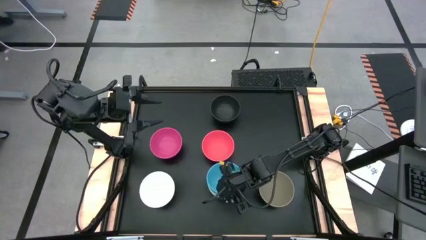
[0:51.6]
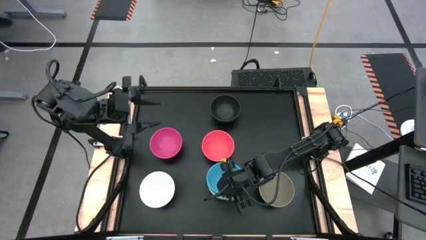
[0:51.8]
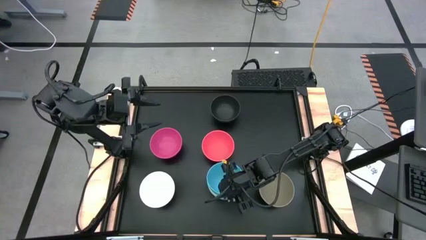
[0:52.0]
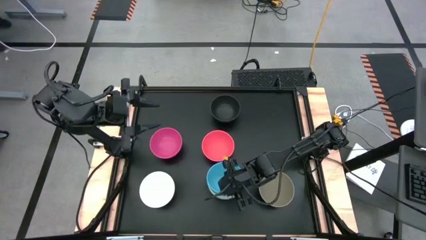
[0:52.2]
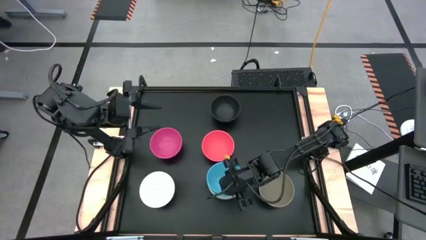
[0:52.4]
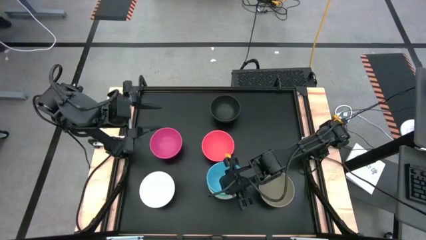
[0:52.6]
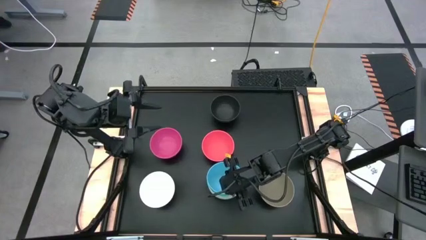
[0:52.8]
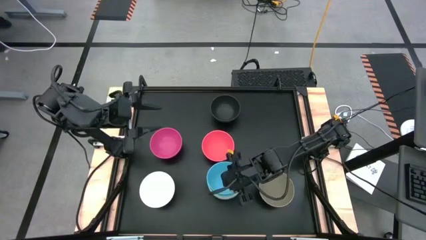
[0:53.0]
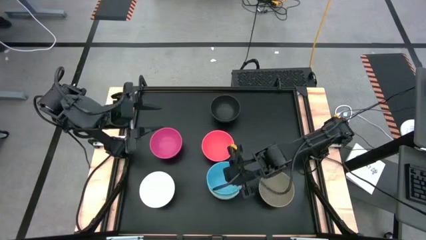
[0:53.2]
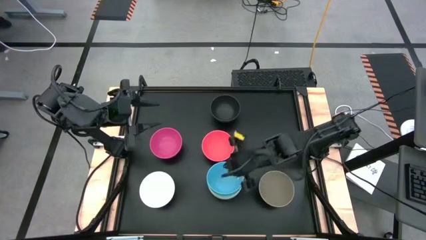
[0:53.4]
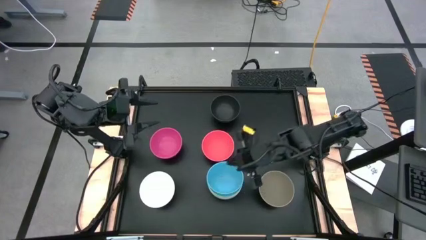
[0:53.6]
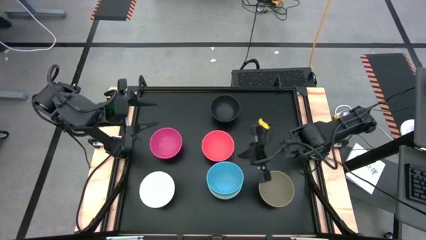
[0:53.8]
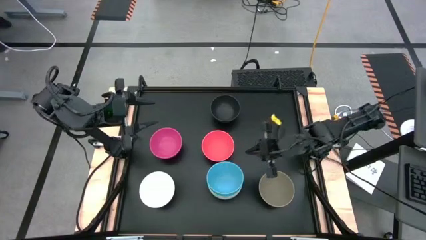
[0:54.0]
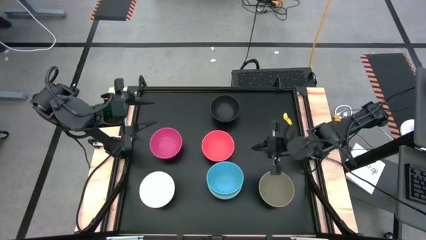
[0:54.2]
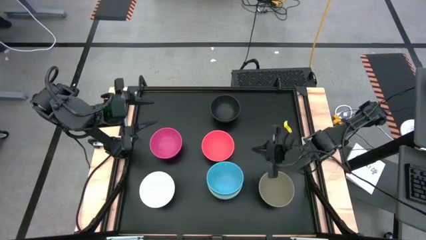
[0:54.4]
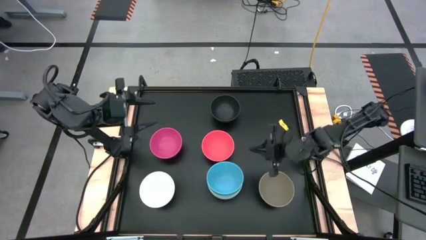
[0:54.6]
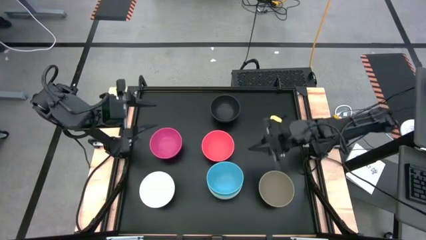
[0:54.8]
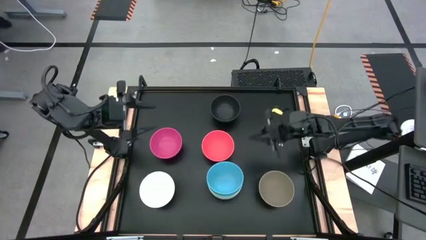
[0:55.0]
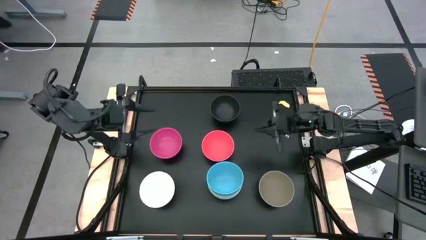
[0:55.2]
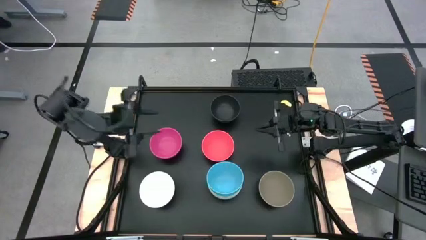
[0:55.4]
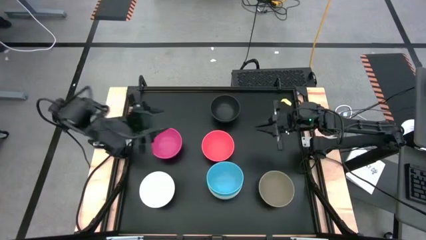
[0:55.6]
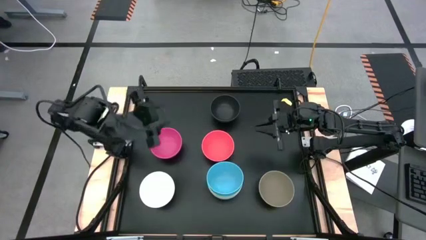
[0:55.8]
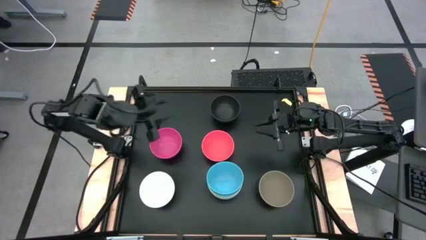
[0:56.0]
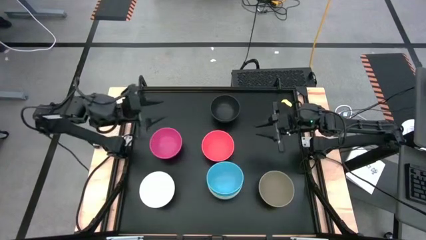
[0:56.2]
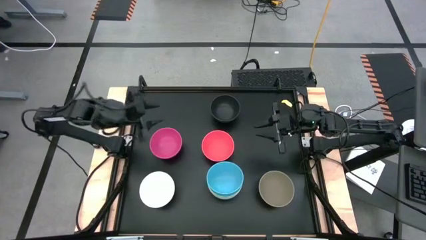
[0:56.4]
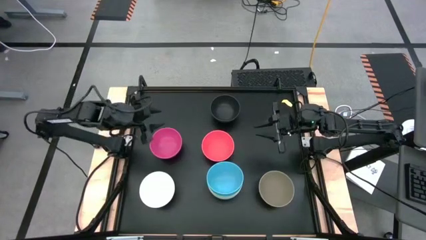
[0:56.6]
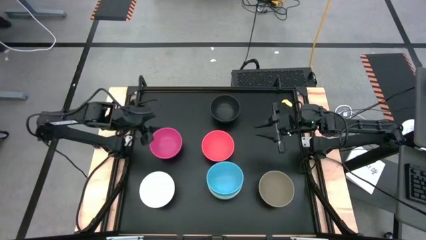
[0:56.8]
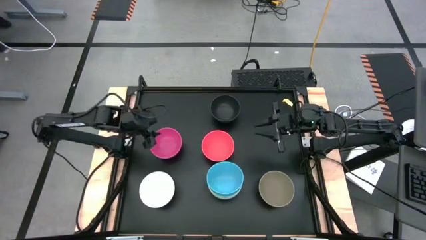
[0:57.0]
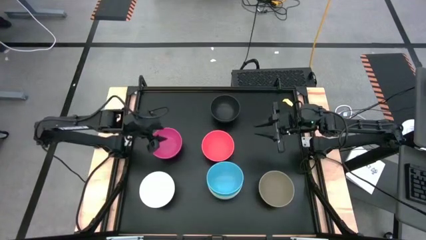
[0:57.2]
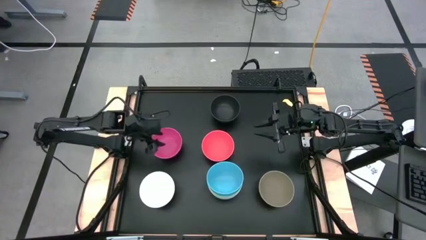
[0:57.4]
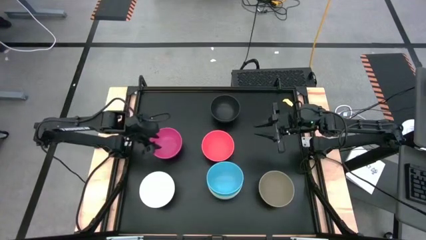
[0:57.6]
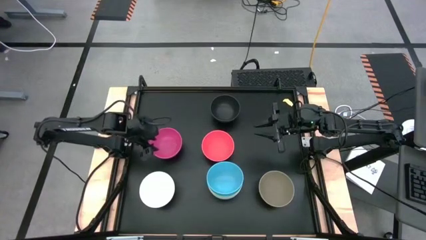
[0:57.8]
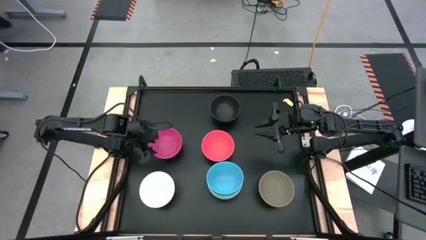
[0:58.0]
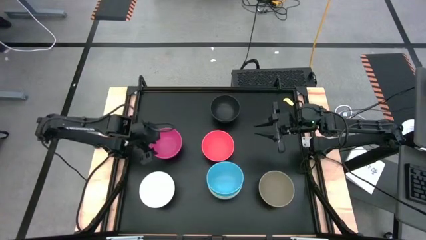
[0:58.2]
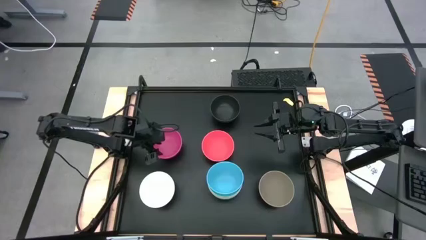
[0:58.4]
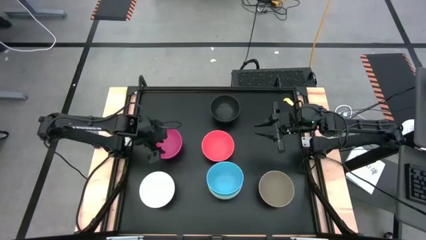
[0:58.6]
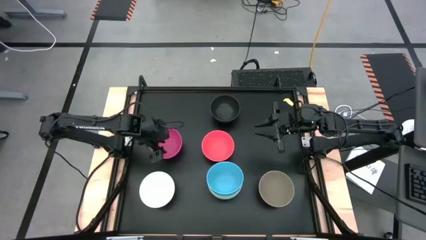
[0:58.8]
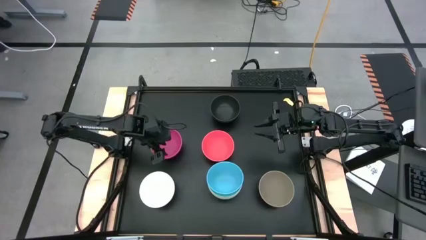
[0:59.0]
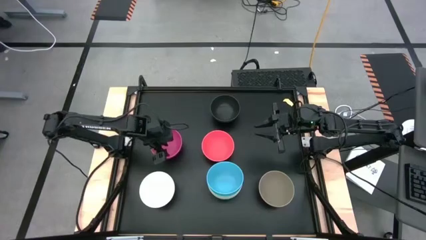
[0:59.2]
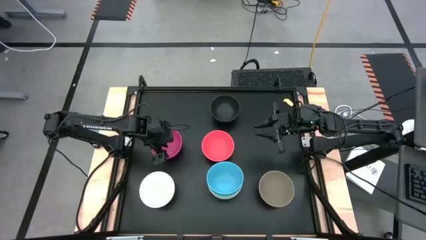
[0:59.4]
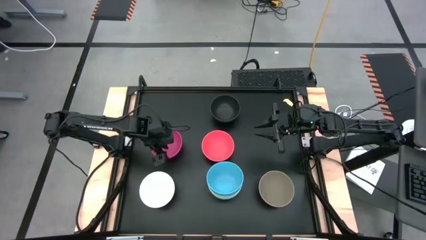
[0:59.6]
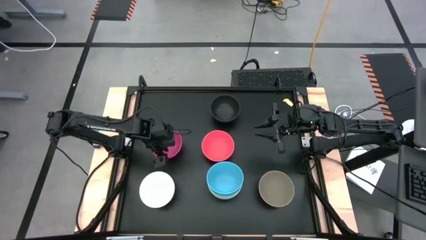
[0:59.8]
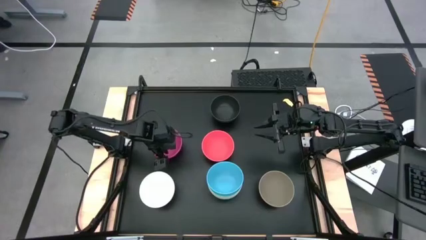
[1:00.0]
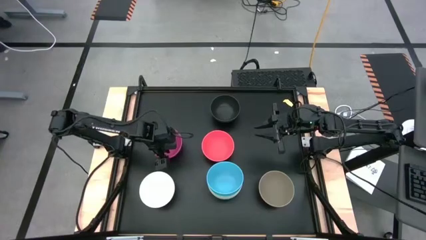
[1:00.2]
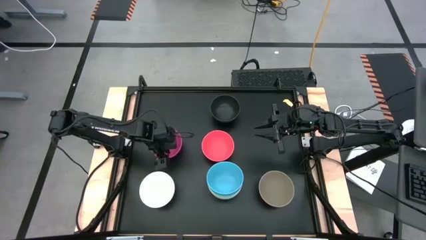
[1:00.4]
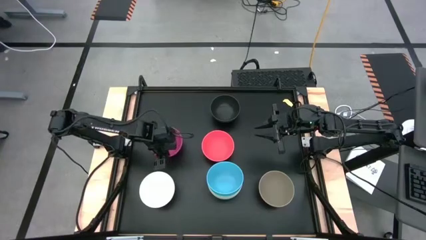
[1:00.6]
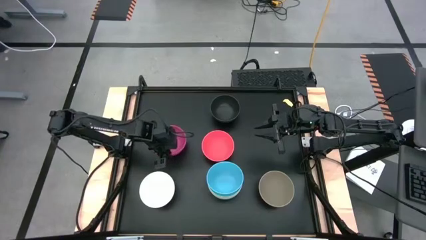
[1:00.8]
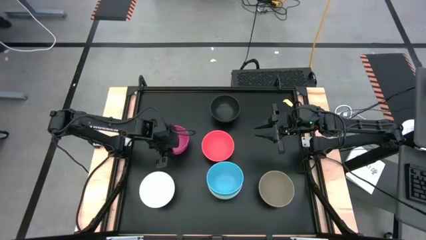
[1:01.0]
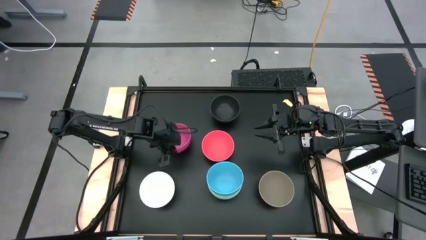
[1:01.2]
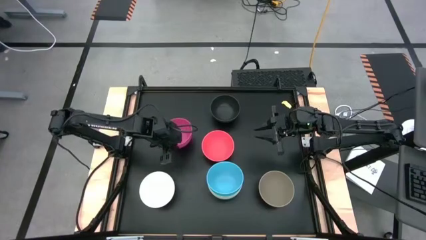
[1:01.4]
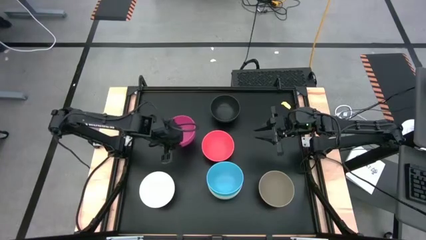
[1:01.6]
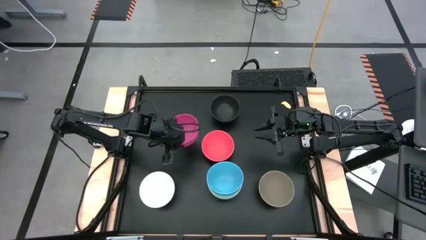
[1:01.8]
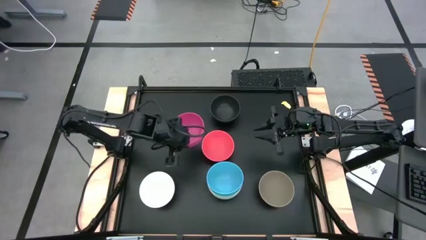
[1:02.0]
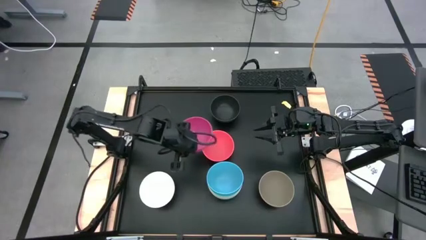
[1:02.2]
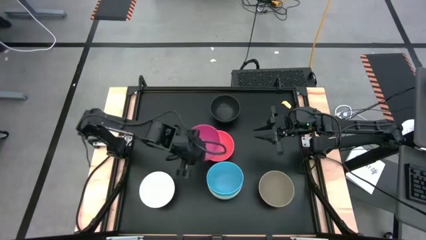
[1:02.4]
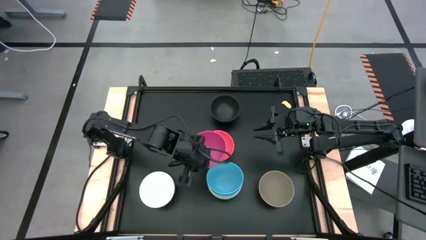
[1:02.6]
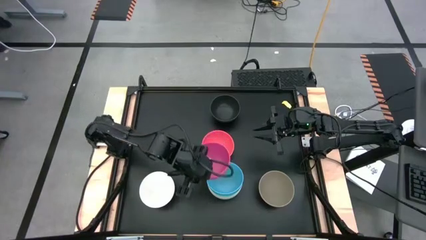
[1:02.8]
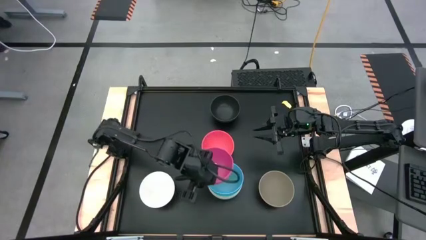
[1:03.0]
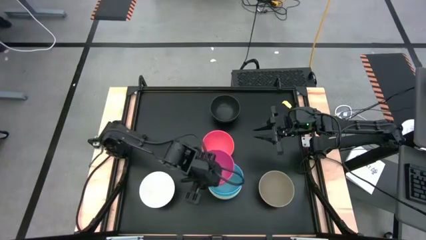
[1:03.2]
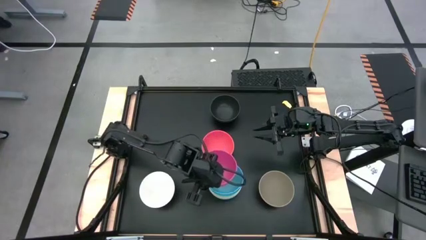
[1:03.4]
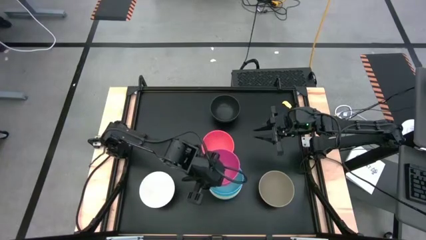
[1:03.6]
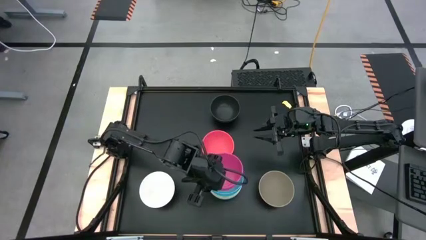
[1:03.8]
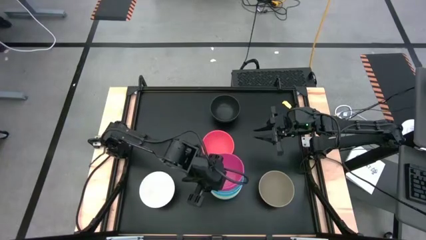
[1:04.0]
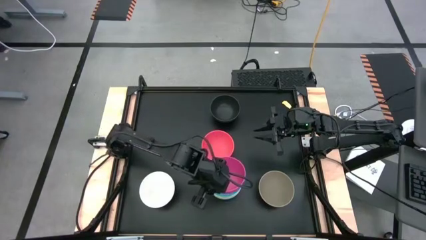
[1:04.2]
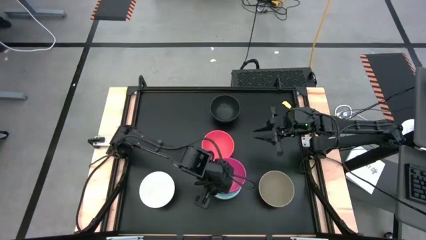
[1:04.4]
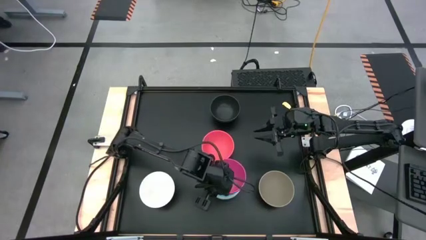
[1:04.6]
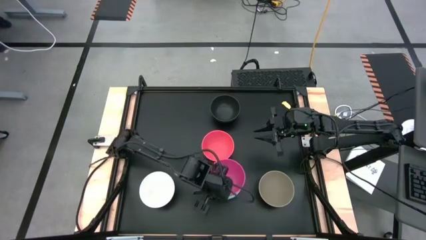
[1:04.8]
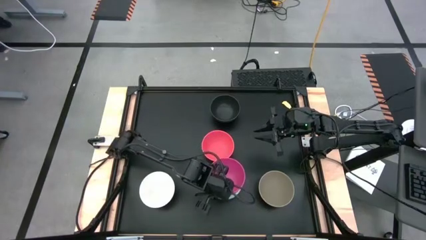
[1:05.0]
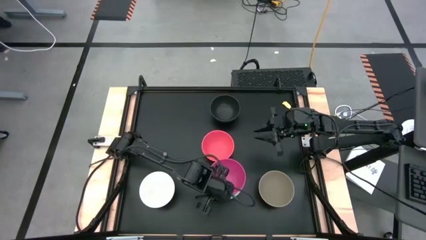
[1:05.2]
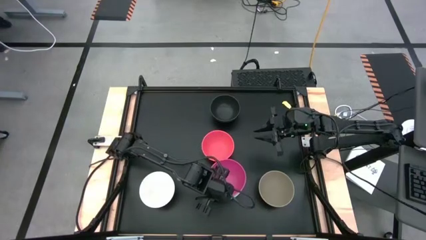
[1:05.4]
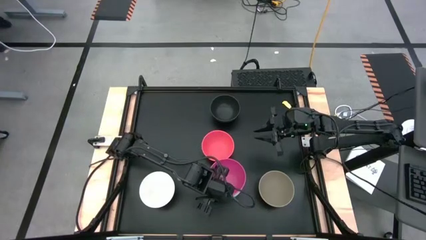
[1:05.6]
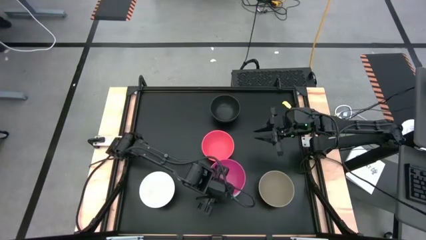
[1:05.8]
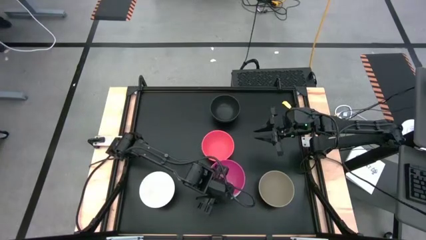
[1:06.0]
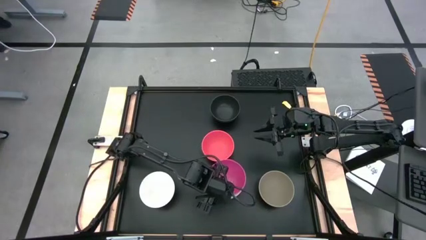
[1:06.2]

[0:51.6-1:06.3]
Task: Nest bowls inside each other
Stack the pink bowl on top of the other blue bowl
